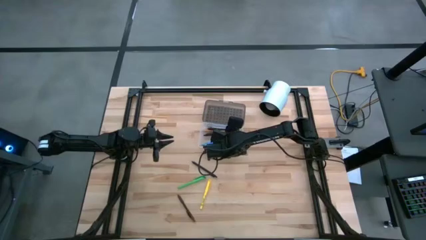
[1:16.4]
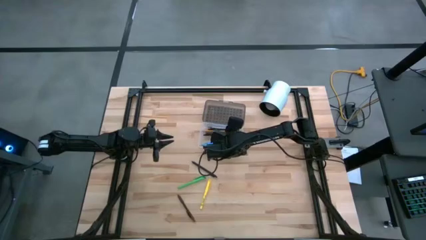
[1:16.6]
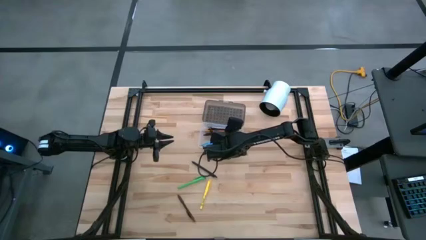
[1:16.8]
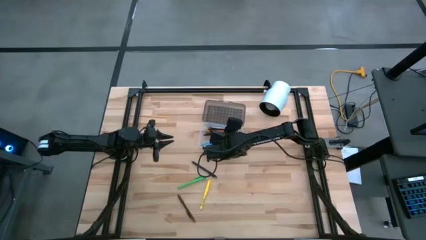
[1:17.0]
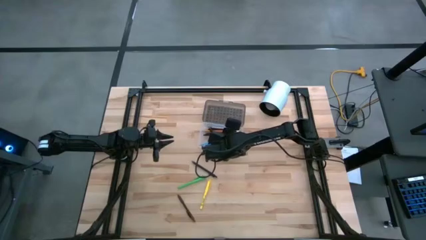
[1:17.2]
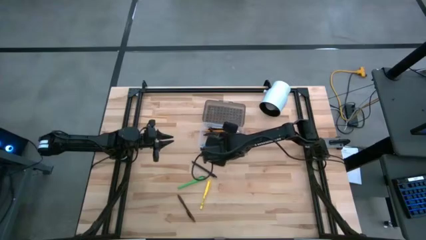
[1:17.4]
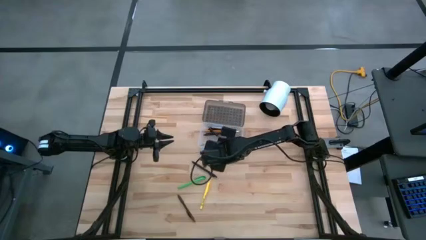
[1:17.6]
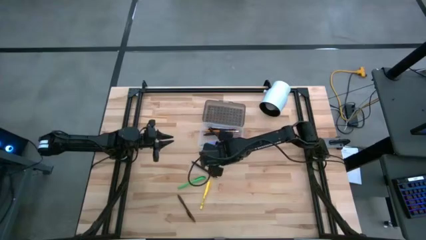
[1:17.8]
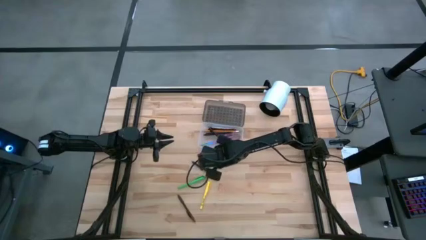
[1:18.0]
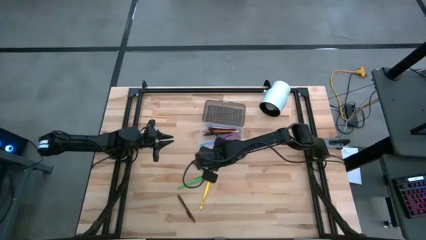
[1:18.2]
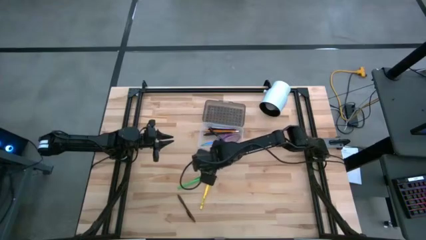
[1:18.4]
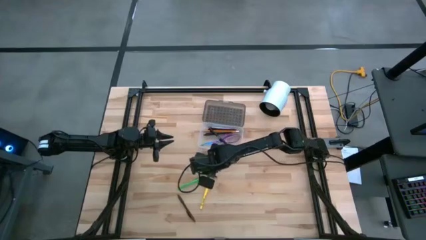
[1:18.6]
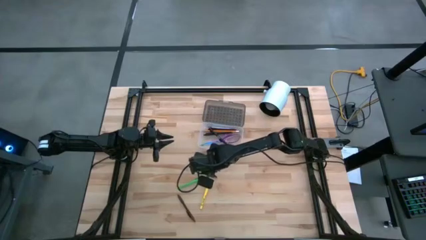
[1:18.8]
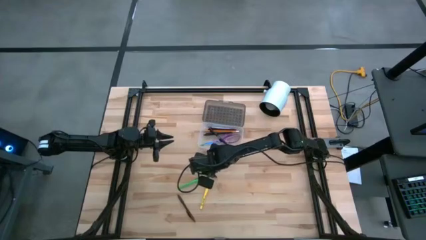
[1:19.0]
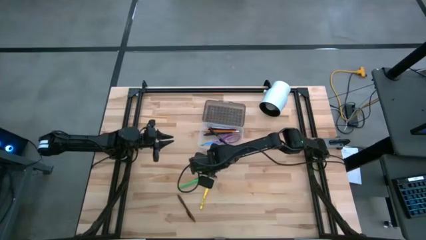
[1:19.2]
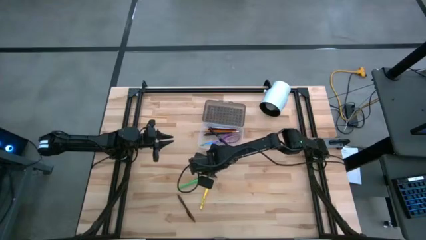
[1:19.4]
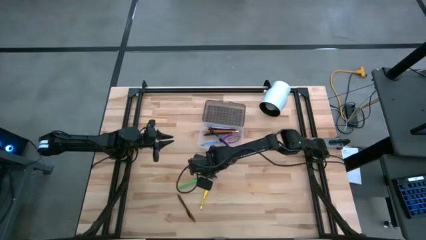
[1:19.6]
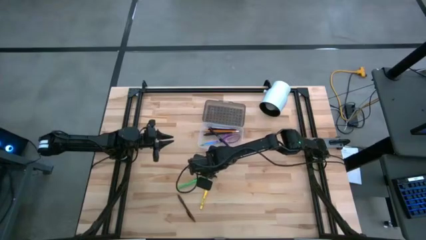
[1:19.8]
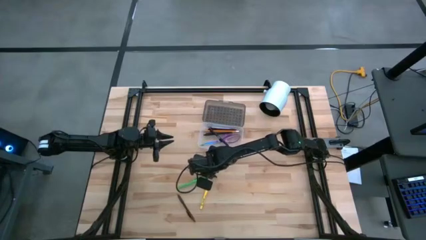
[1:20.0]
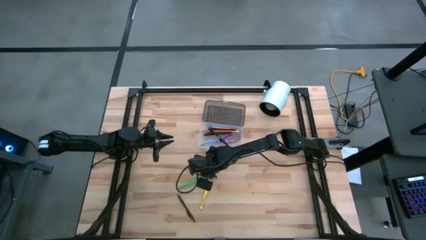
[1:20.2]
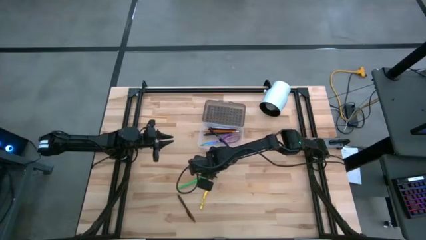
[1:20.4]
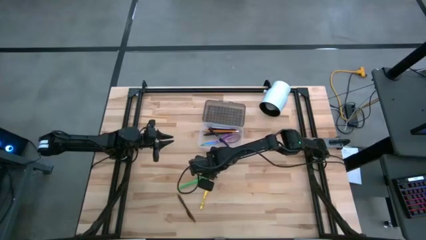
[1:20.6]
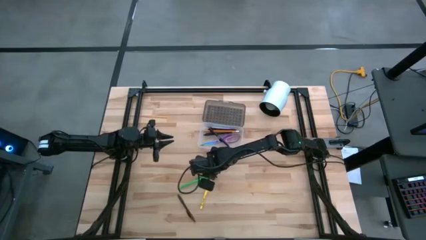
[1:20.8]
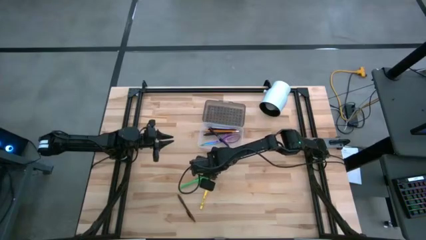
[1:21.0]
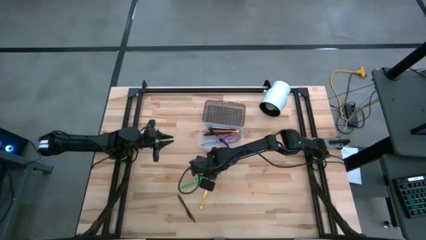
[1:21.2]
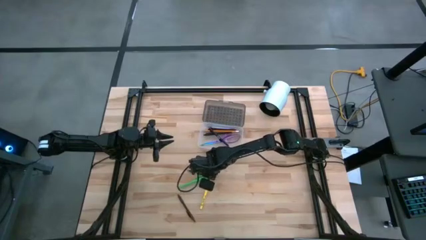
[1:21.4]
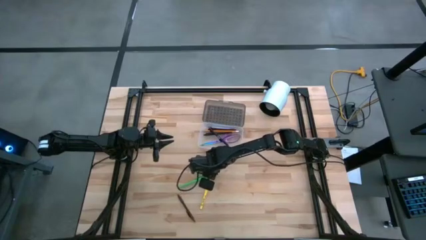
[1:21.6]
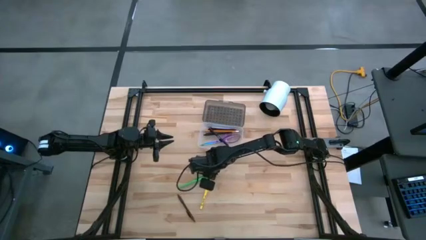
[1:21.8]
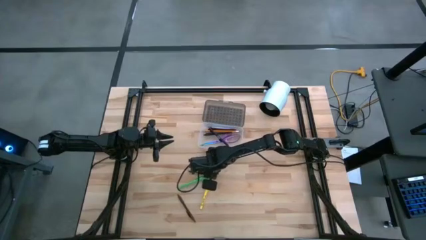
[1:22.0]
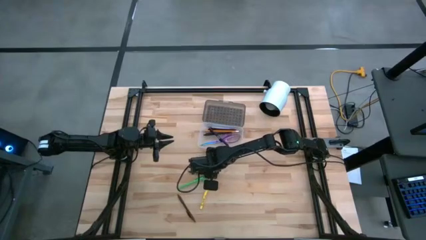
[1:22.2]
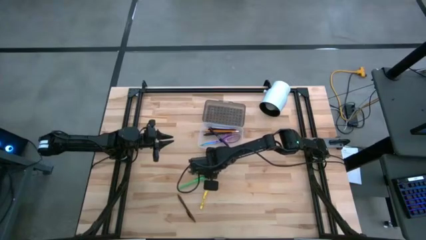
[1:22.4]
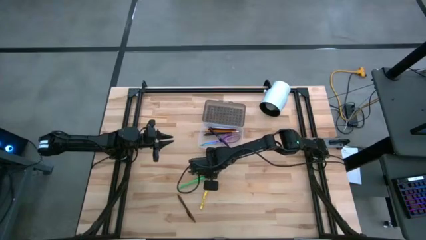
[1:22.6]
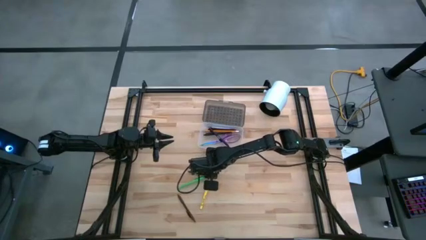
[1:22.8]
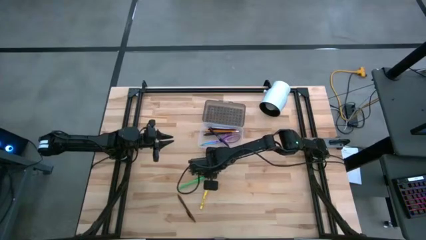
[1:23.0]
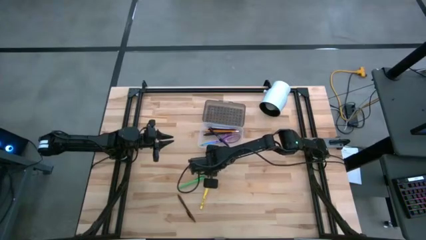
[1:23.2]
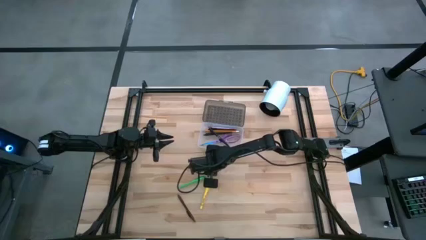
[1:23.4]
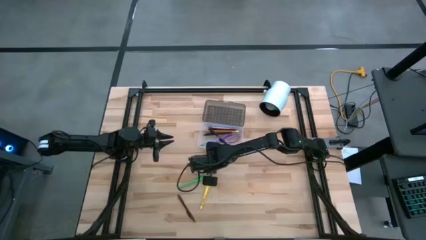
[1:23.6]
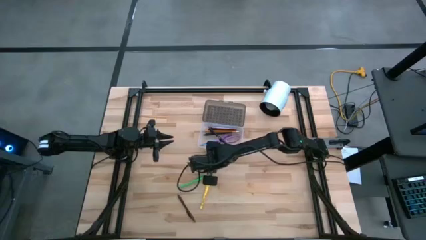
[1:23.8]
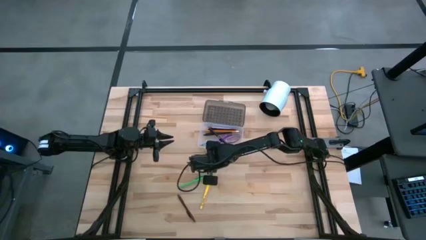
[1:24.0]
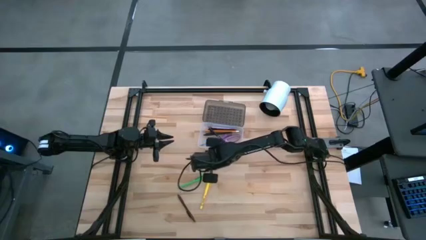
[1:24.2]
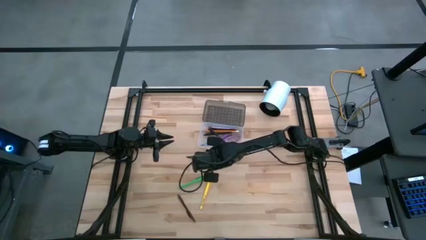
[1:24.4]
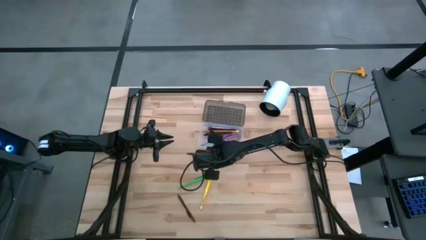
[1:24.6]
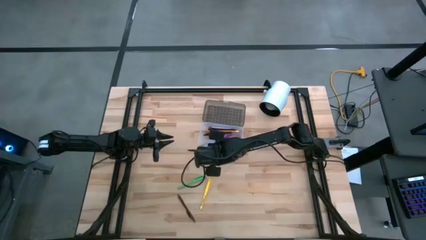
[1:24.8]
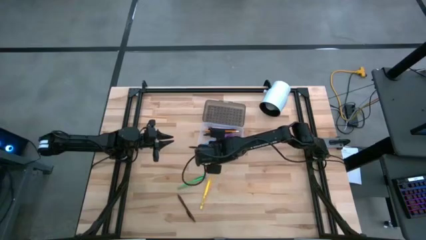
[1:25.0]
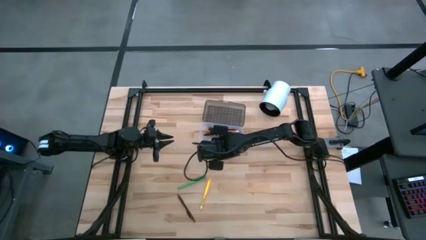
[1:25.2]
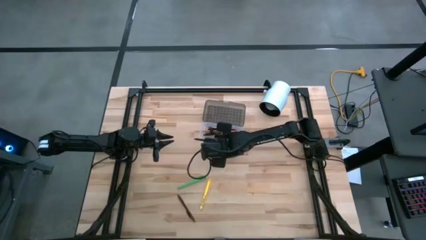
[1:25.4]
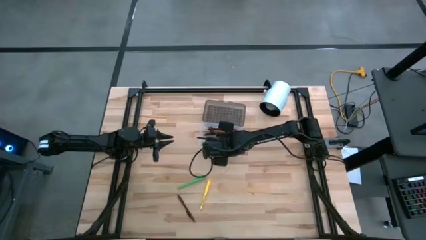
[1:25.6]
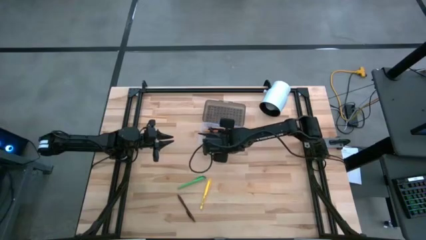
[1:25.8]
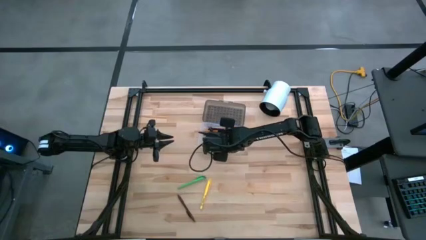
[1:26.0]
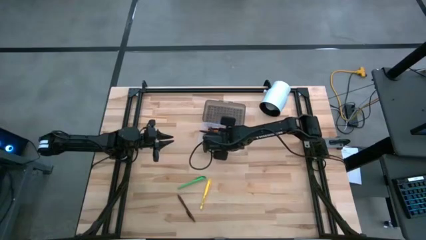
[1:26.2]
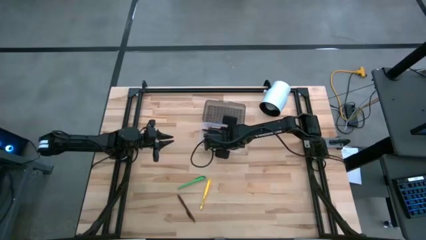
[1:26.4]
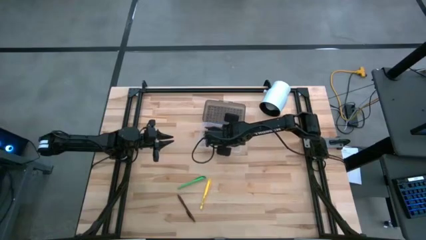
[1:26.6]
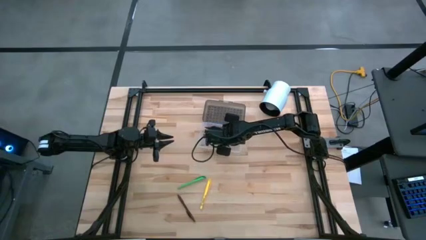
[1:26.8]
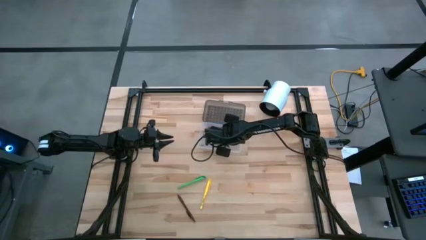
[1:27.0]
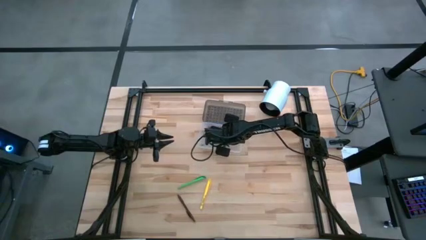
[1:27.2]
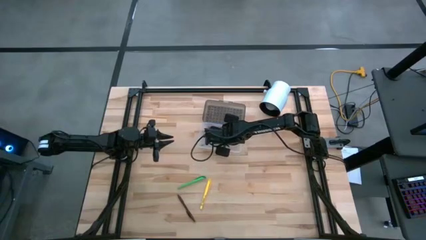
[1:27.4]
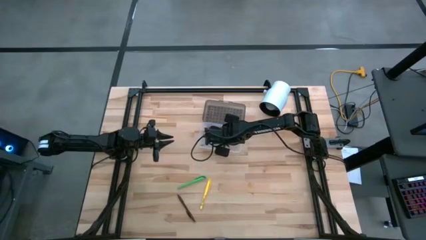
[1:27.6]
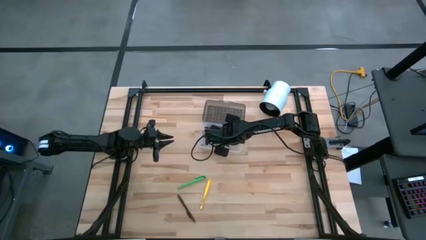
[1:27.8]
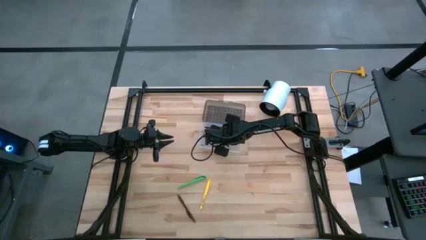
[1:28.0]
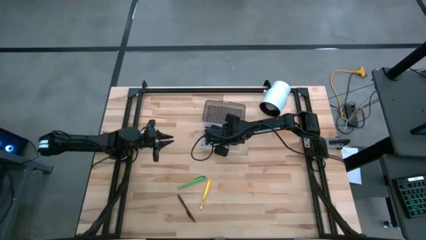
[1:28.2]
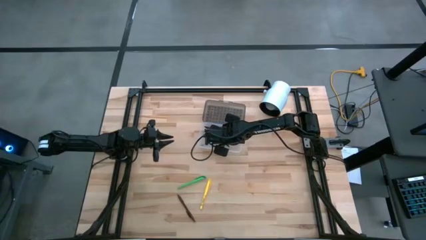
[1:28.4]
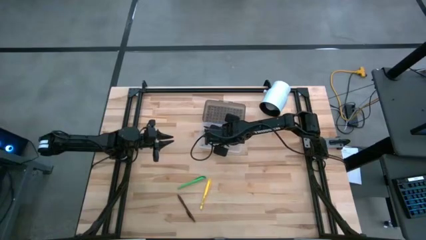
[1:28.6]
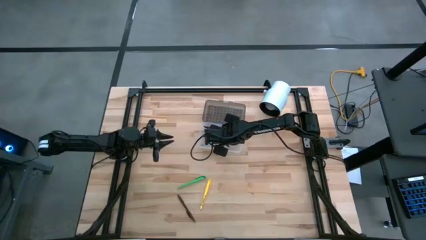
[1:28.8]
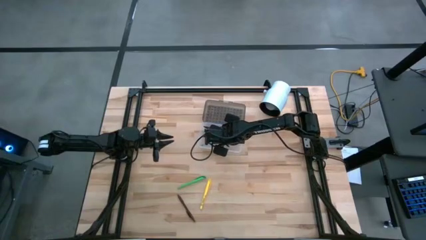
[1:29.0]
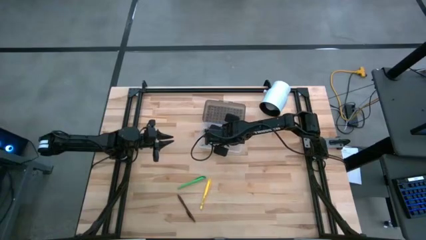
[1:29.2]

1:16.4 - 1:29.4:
Task: Pick & place school supplies into a supply box
Put the black pen into the supply box
